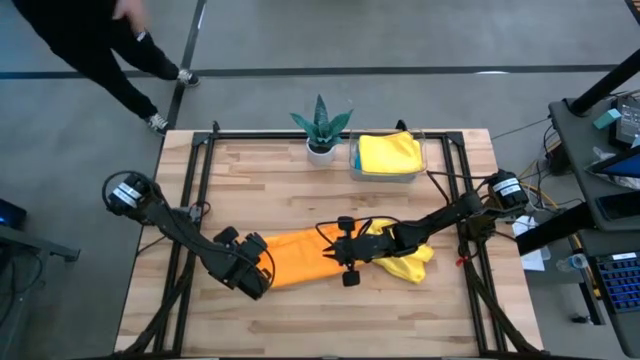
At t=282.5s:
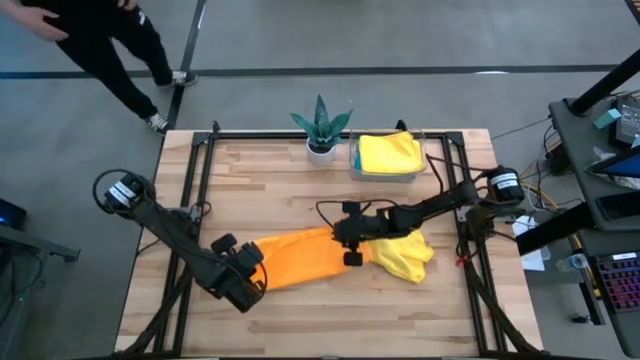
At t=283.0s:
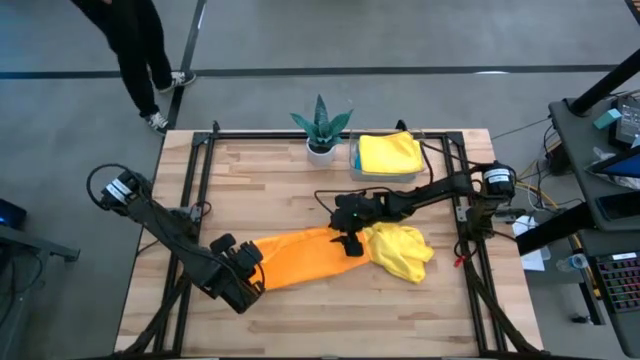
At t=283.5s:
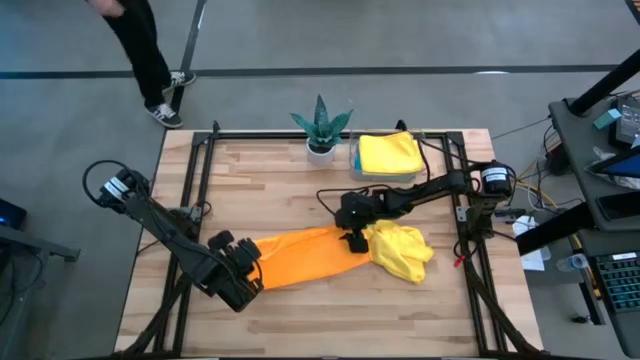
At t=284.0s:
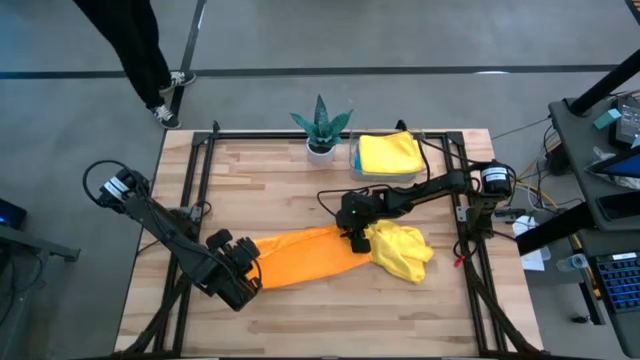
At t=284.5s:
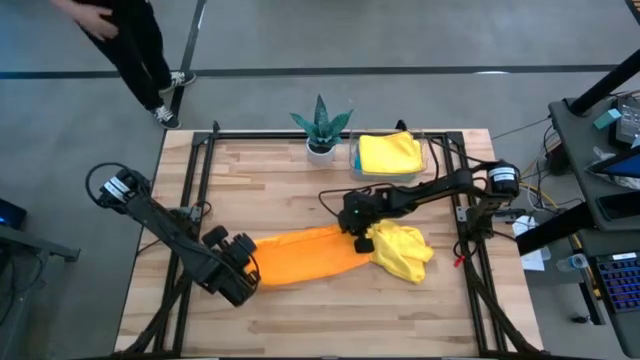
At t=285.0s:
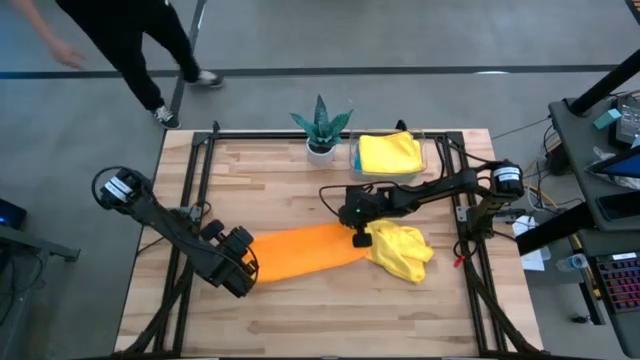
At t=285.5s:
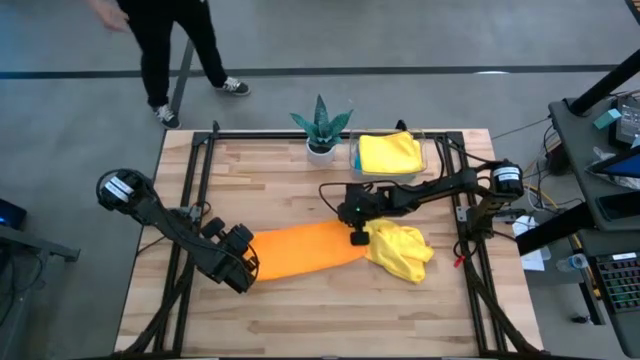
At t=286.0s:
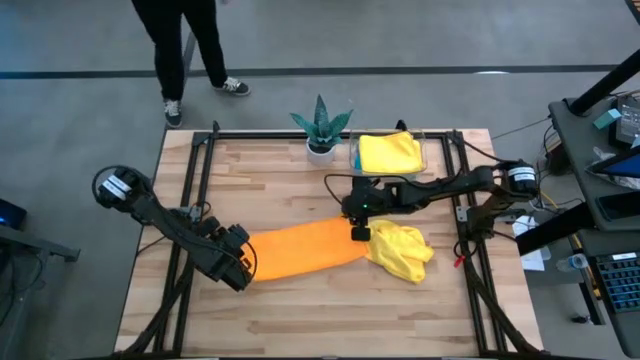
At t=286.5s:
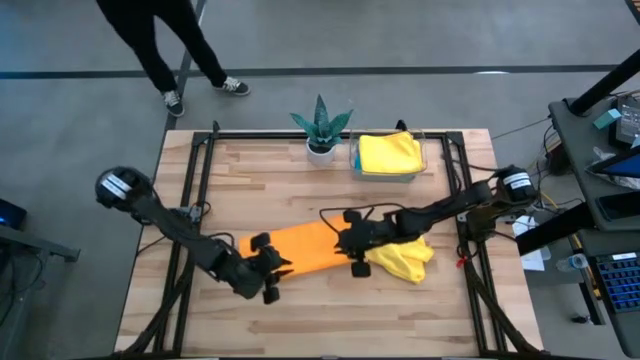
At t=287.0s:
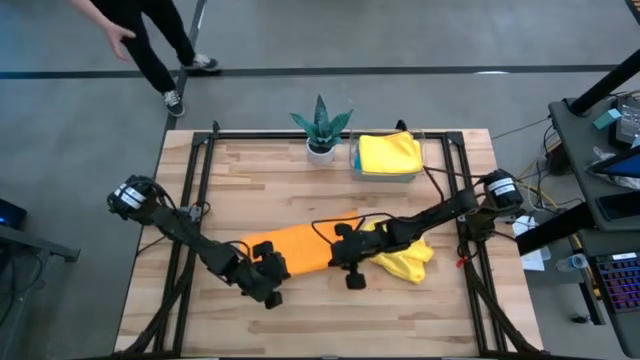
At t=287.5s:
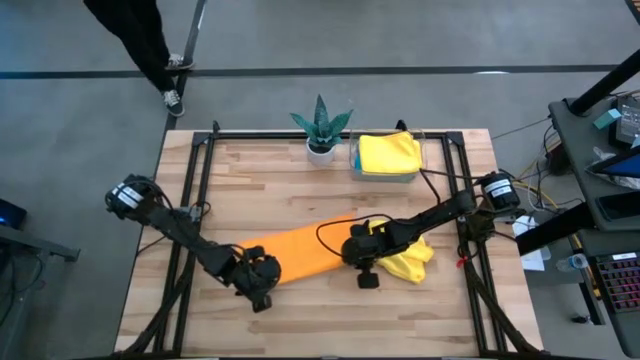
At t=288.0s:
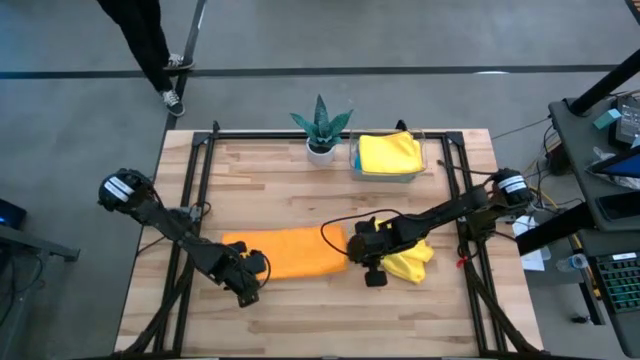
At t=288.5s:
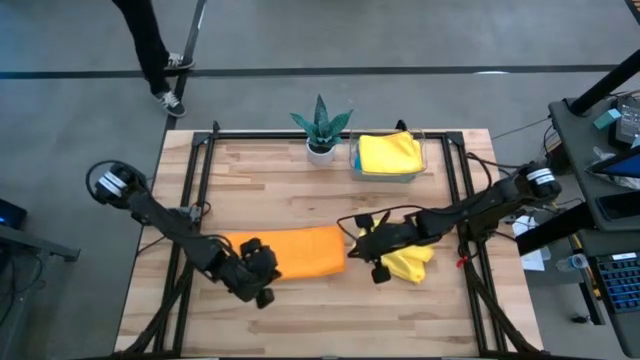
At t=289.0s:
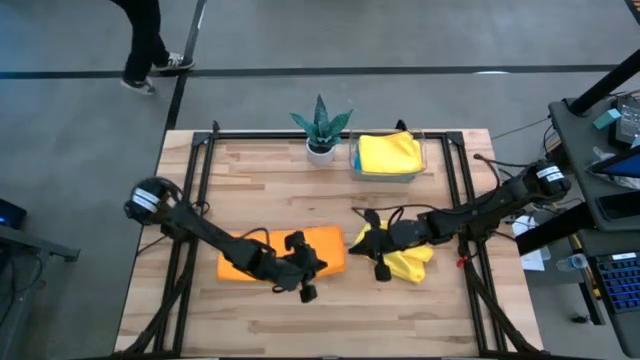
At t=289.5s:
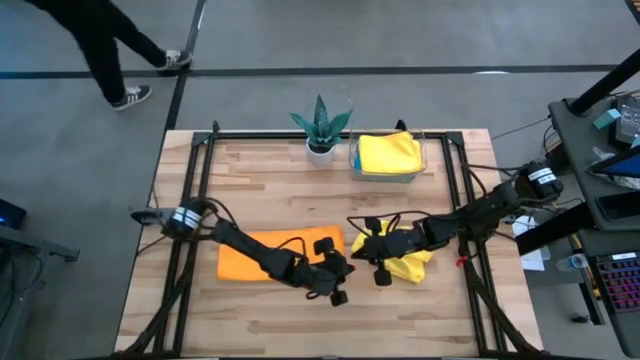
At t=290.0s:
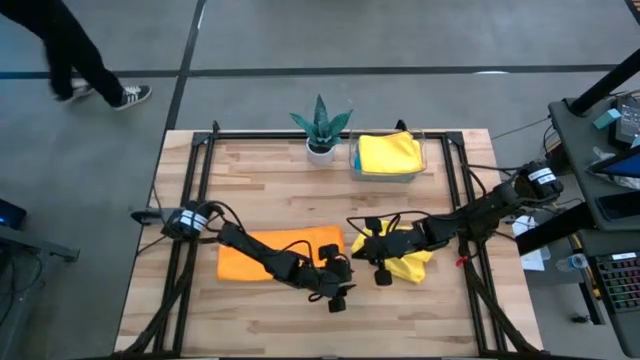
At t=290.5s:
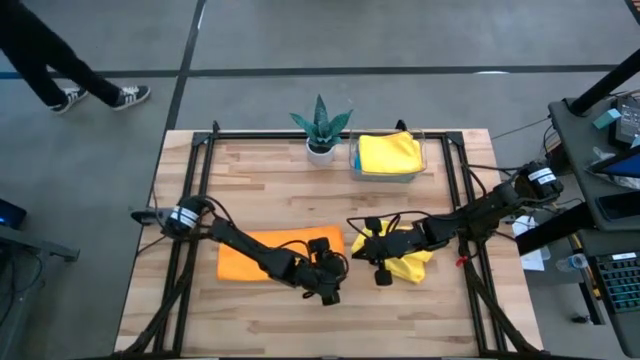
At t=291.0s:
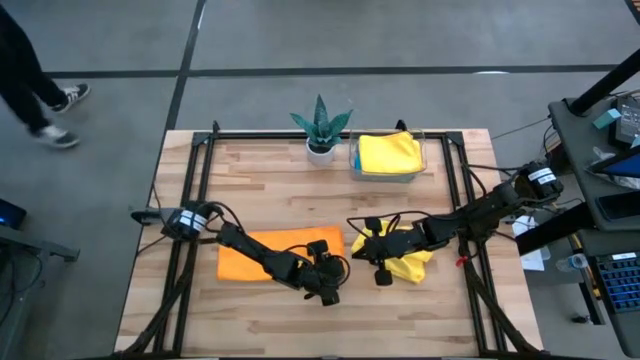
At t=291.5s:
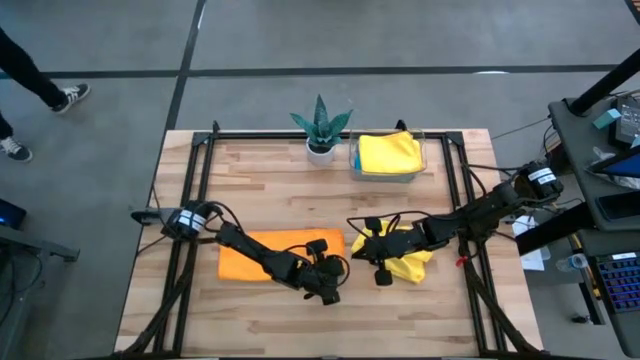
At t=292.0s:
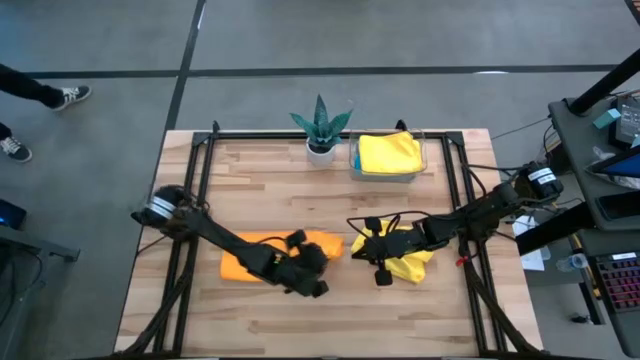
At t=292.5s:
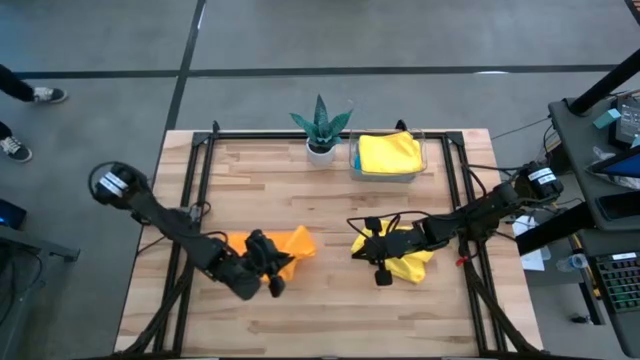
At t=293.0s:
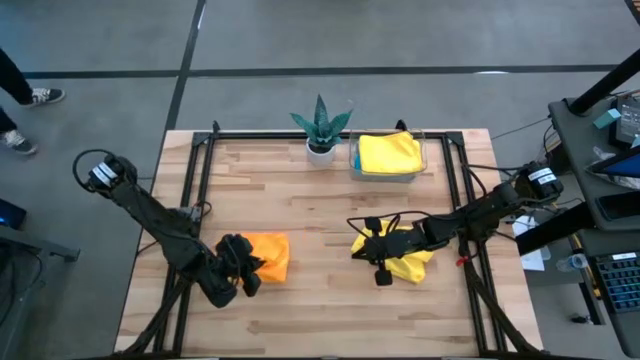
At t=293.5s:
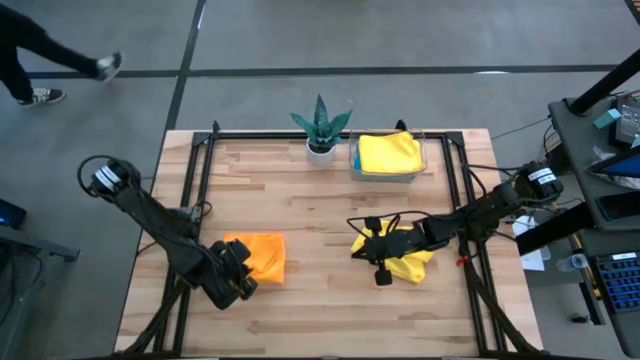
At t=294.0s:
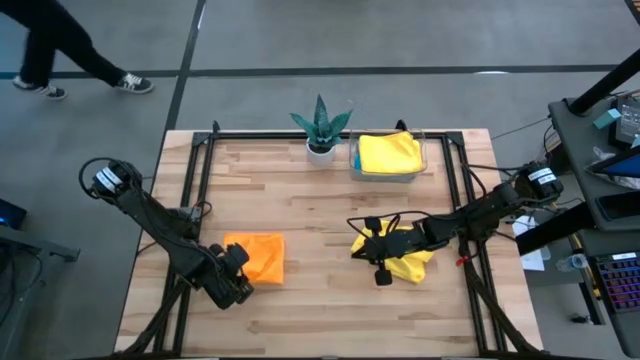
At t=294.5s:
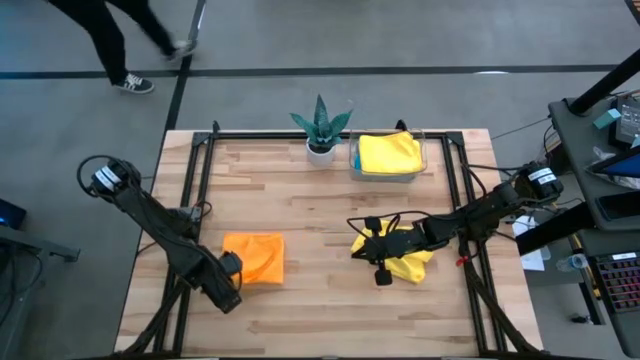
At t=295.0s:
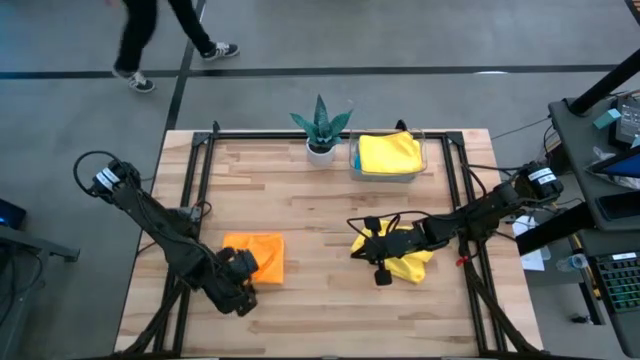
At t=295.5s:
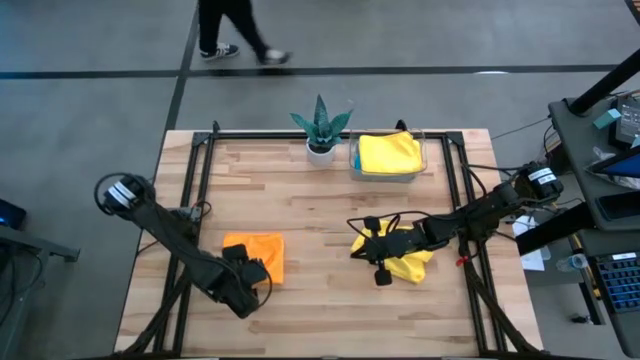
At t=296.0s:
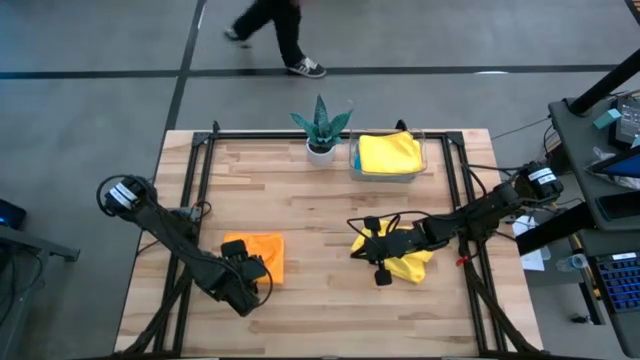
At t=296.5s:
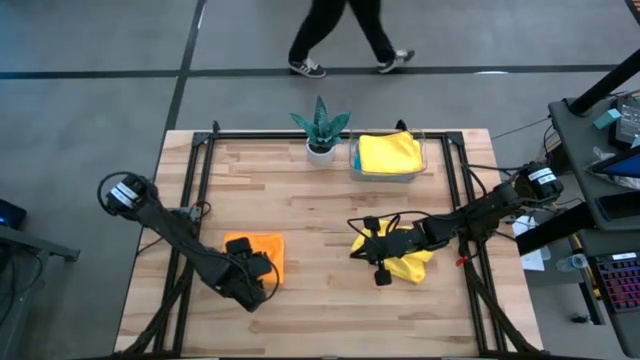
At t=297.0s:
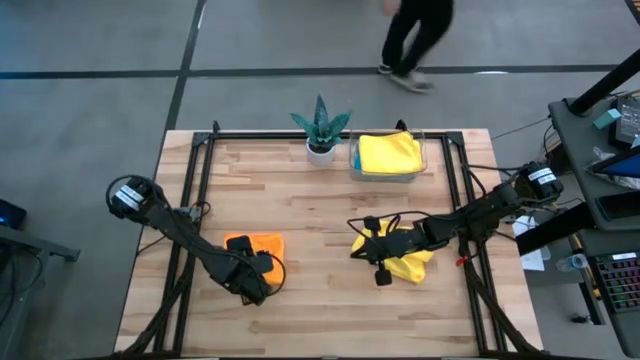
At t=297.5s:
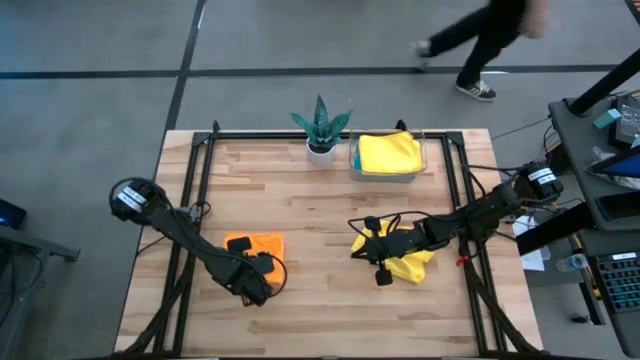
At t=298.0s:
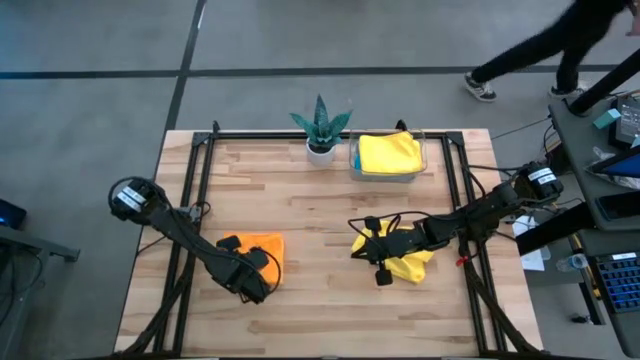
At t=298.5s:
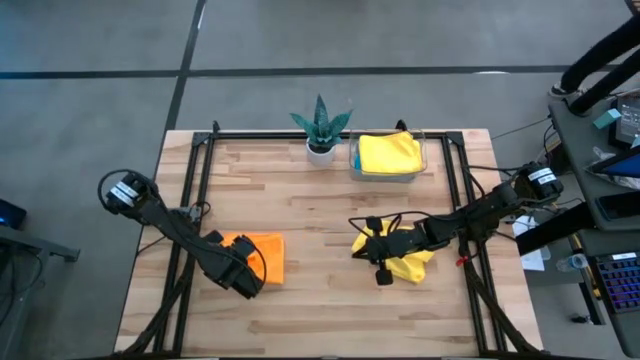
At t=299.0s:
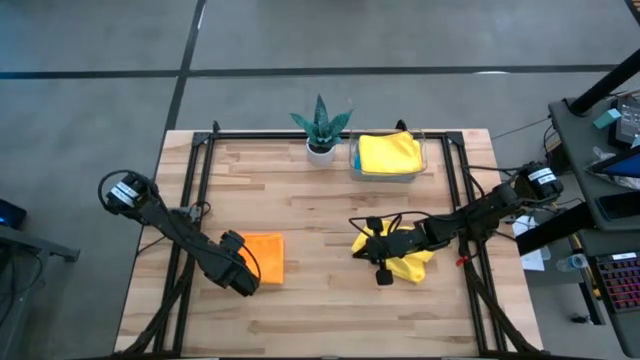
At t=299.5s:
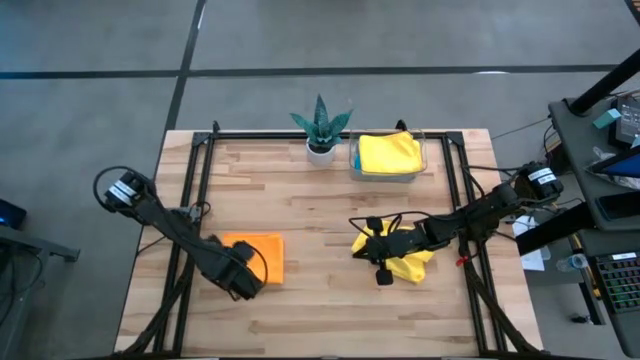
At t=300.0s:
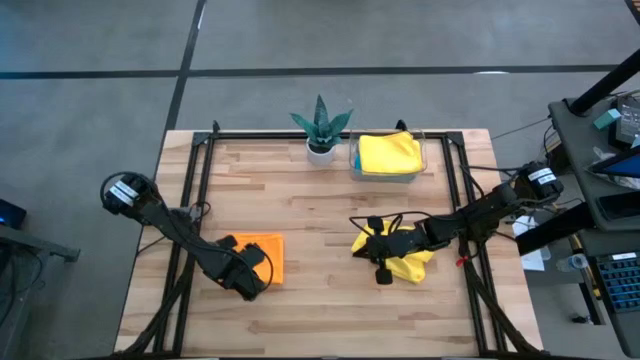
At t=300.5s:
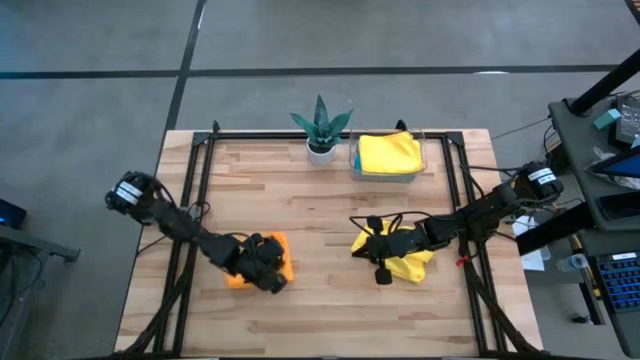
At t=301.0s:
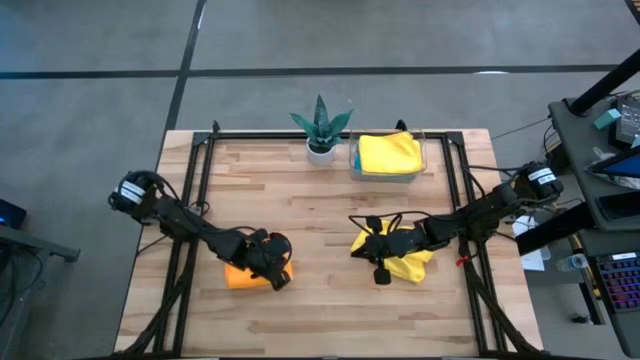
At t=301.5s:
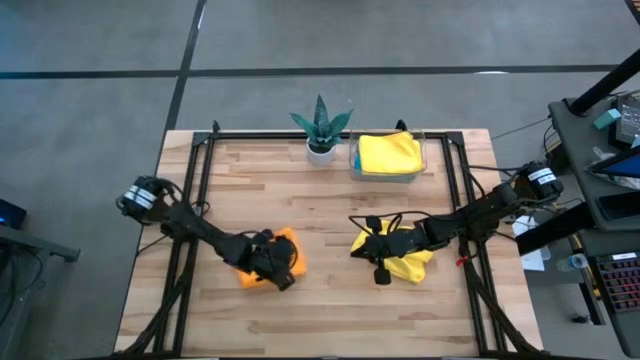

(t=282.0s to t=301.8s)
Task: Fold microfiber towels
Fold the orange microfiber towel
